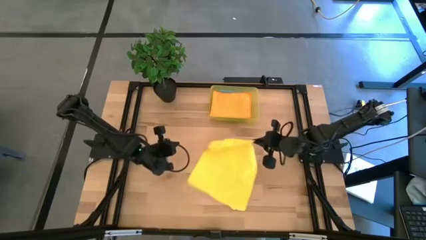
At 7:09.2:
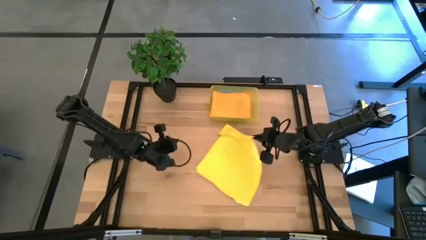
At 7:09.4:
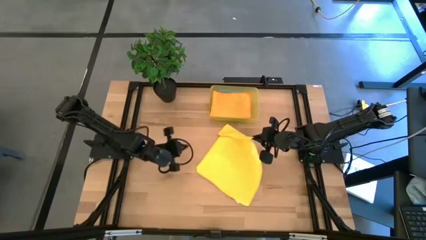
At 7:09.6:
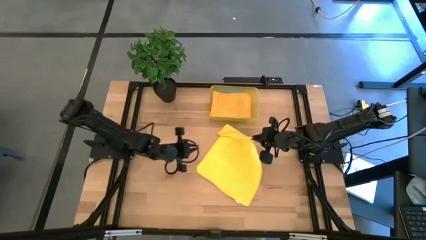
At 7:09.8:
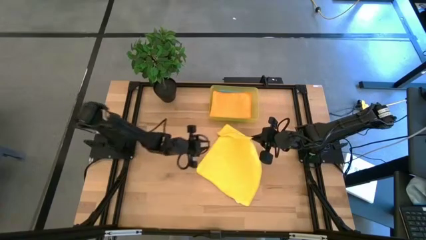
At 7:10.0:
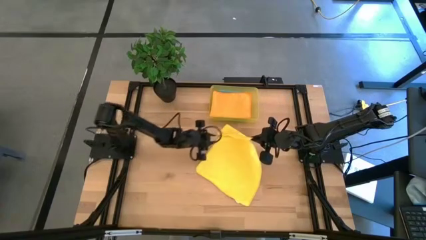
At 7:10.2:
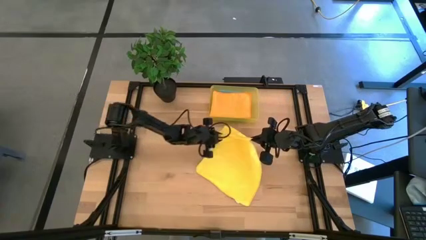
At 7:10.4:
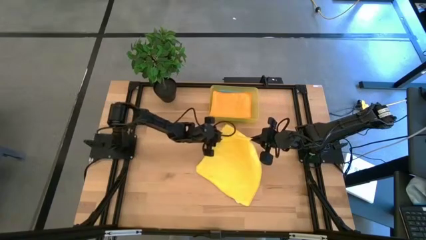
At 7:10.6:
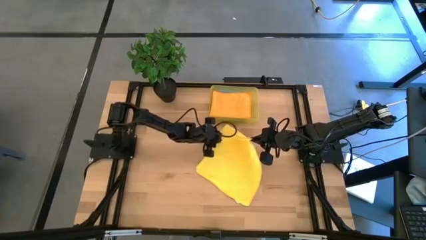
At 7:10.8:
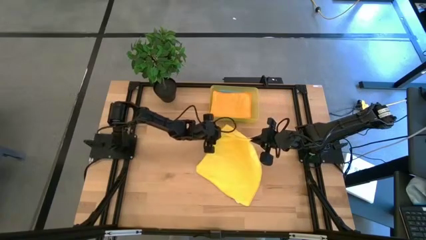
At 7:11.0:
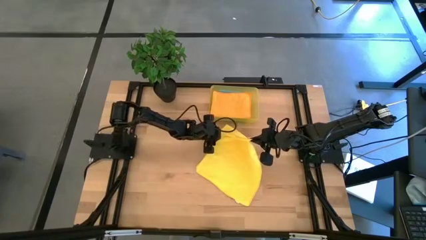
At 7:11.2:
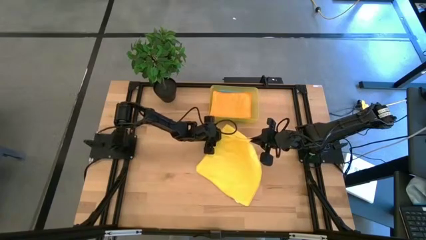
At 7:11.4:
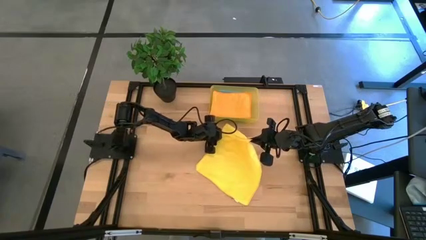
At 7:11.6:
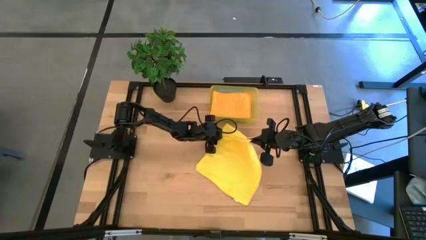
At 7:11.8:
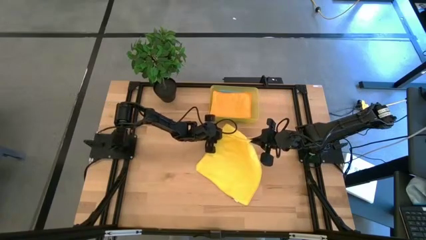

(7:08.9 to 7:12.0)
Task: Fold microfiber towels
Fold the yellow microfiber towel

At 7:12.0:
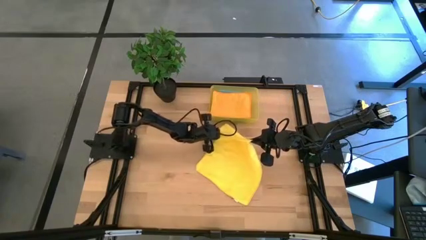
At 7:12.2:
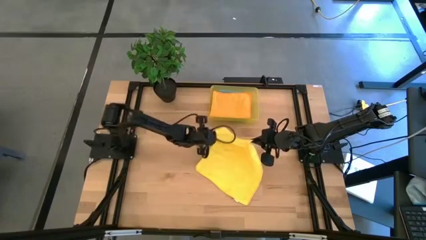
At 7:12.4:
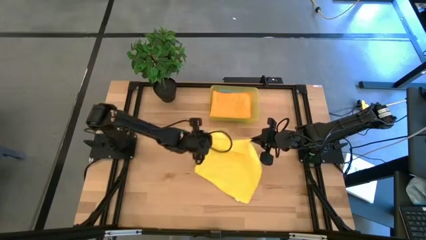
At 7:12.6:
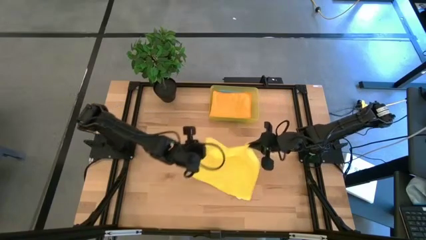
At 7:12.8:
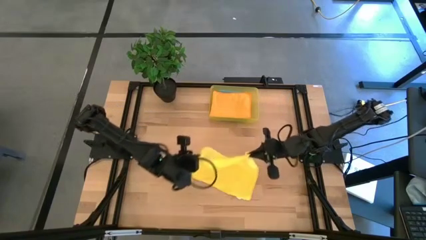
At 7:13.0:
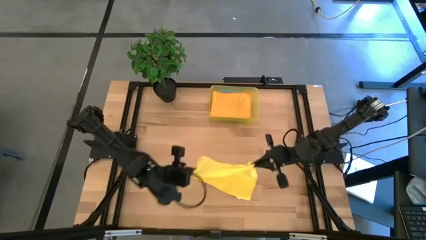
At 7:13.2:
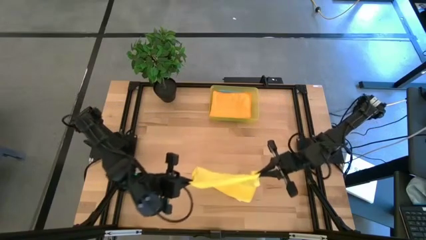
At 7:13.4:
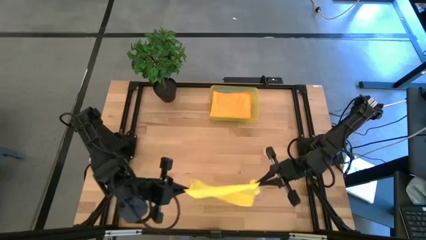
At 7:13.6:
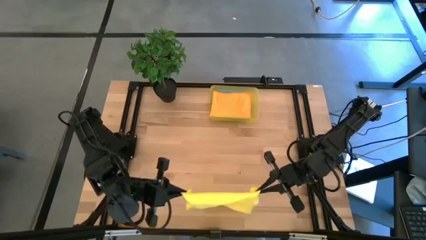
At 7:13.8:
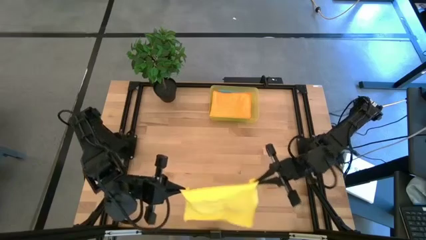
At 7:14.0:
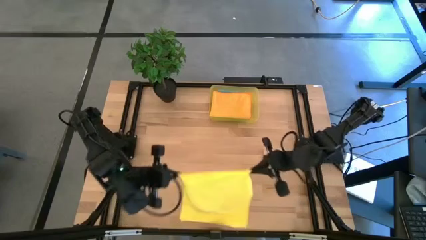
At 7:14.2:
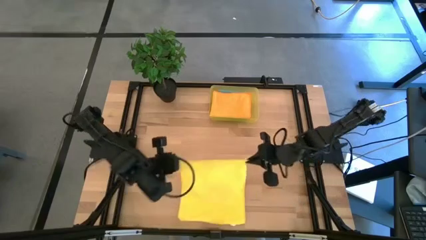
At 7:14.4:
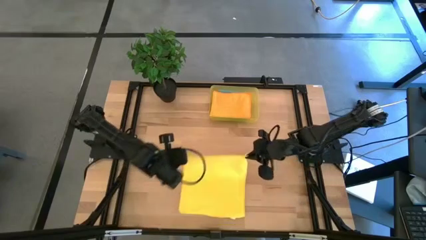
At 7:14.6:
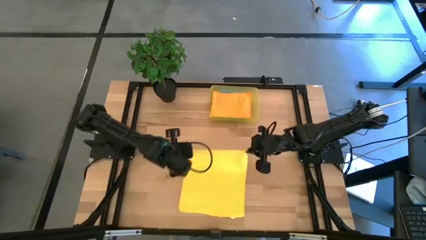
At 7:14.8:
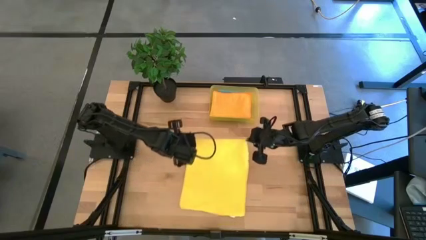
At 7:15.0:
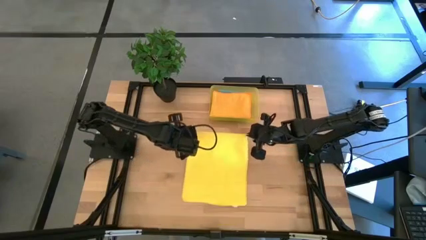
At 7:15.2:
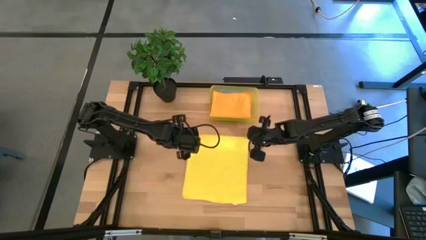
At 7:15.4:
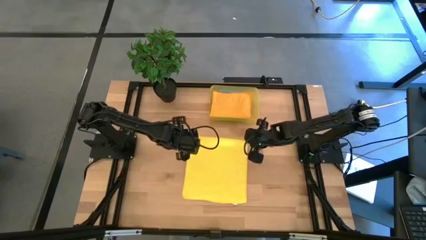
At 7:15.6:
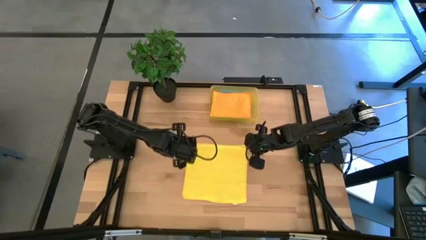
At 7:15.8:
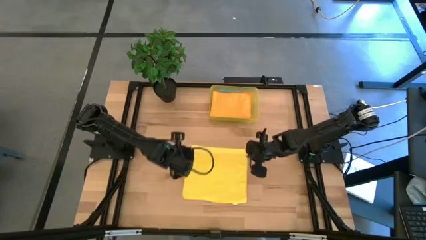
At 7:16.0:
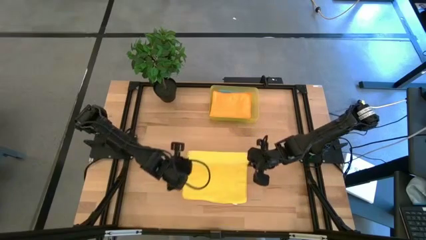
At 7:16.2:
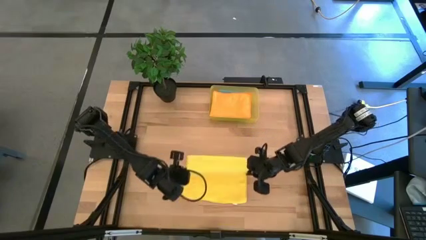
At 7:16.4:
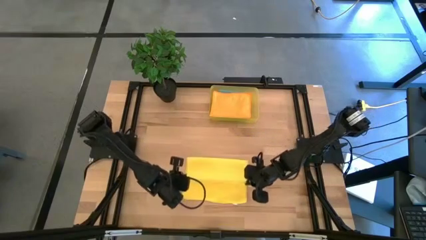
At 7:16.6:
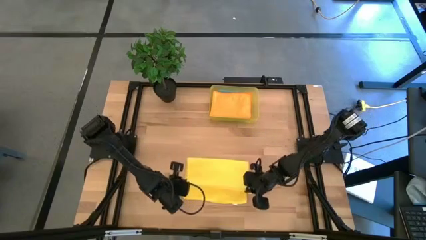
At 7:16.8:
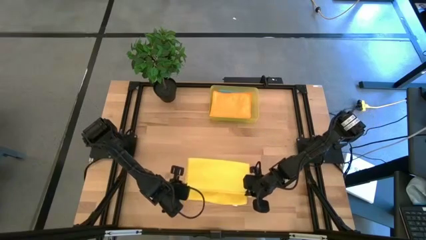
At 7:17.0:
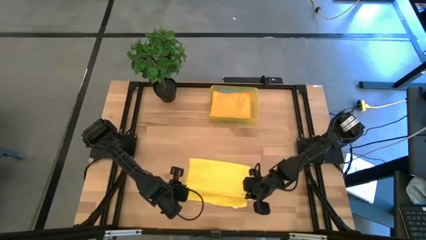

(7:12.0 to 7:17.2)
Fold the yellow microfiber towel

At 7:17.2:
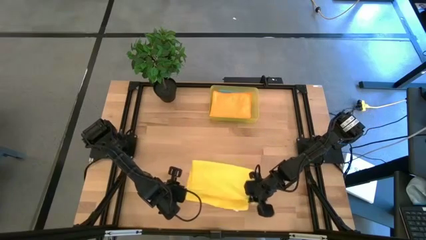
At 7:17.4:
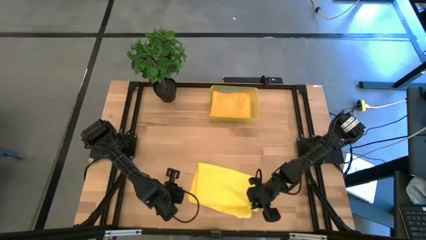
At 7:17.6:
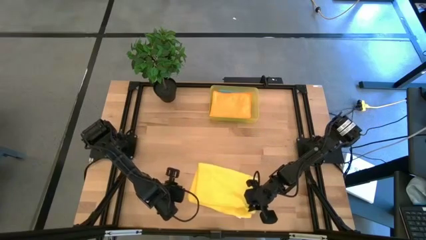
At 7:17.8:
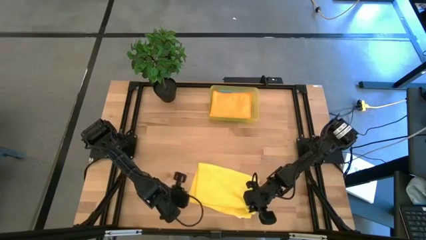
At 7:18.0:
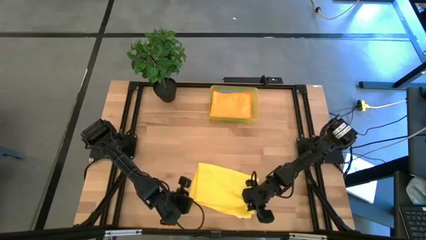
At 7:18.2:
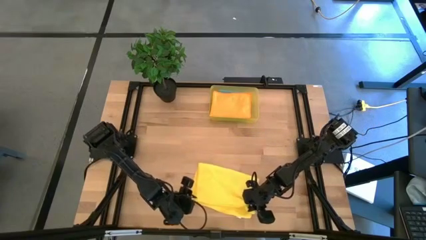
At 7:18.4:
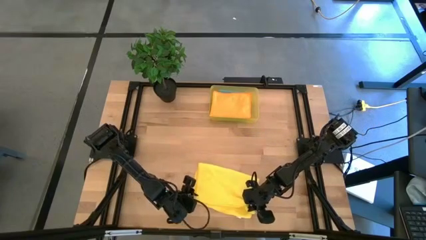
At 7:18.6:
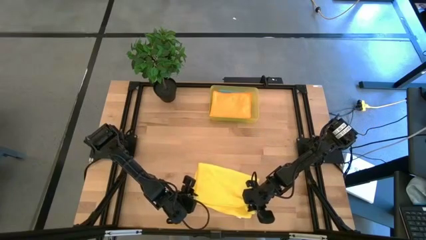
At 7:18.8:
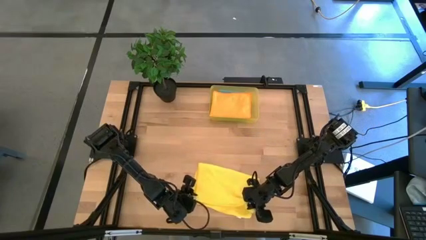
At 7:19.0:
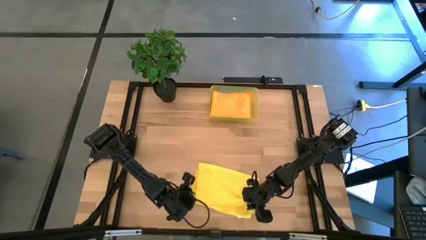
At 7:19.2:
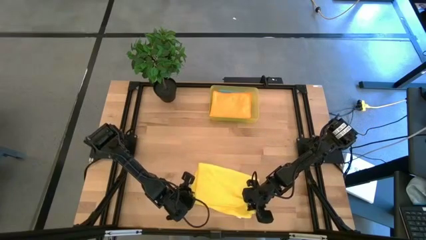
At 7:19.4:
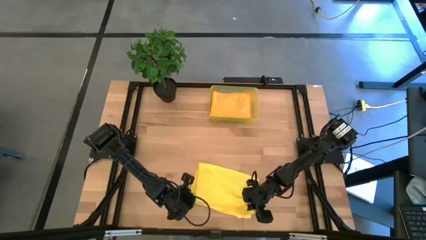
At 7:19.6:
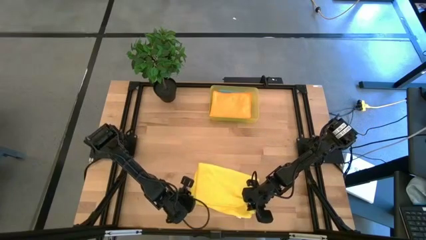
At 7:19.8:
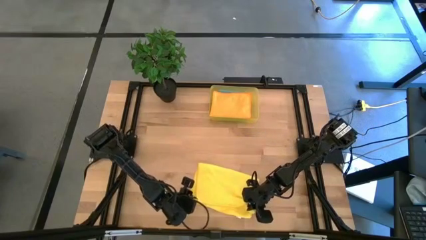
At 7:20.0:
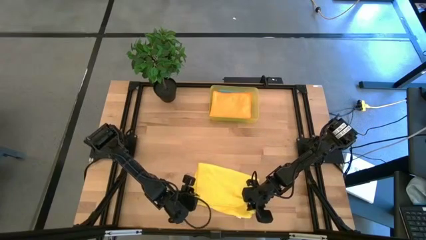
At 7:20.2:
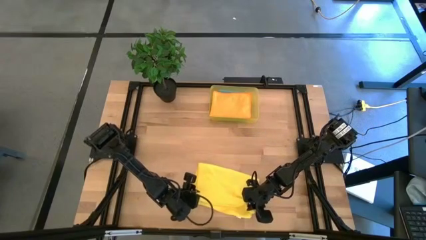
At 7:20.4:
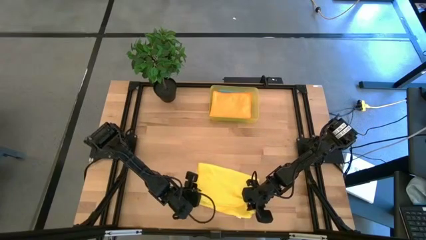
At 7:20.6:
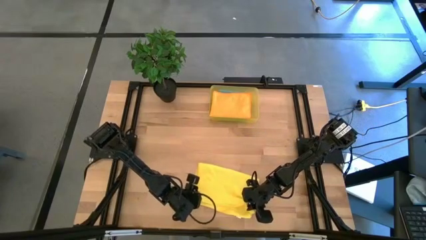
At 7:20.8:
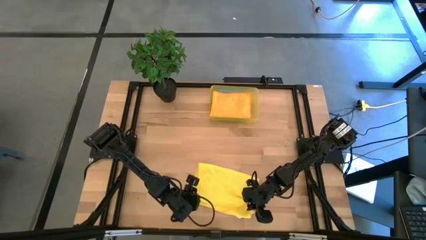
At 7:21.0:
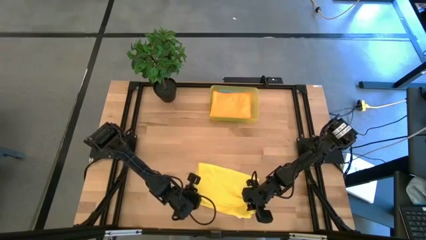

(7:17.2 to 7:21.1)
Fold the yellow microfiber towel

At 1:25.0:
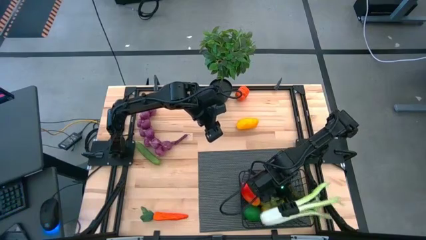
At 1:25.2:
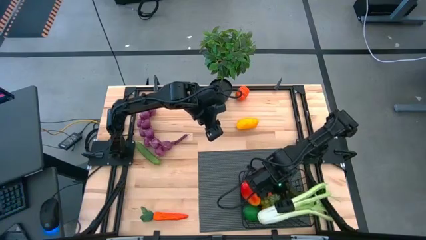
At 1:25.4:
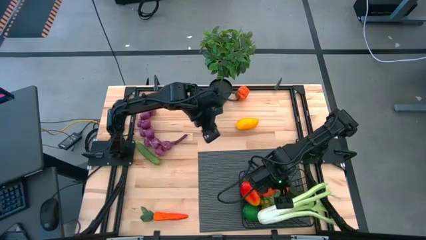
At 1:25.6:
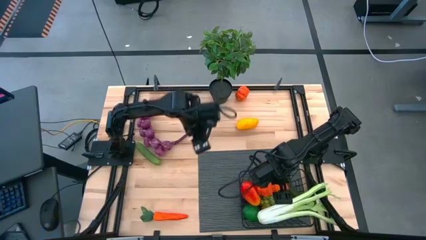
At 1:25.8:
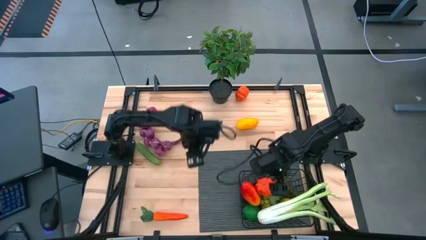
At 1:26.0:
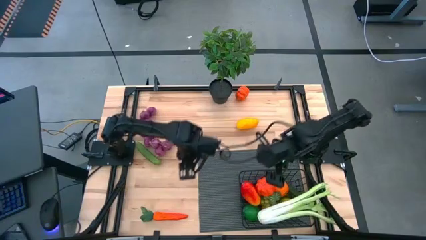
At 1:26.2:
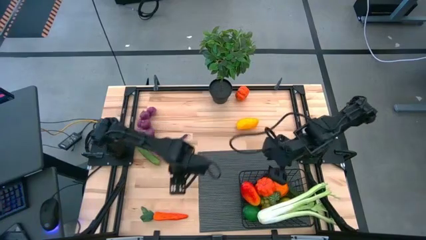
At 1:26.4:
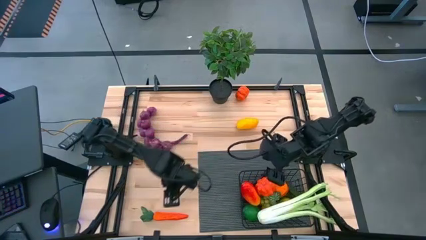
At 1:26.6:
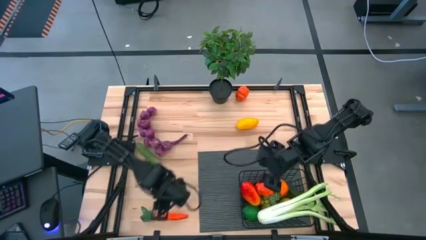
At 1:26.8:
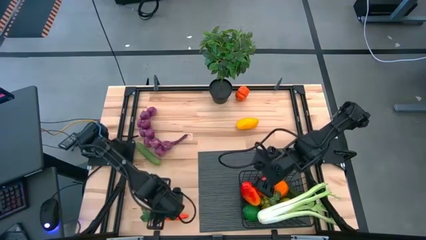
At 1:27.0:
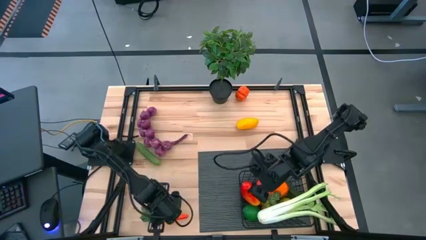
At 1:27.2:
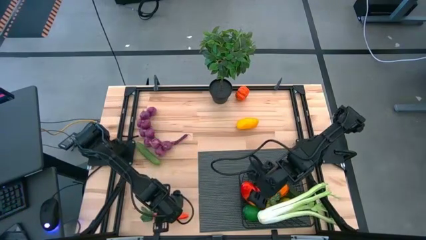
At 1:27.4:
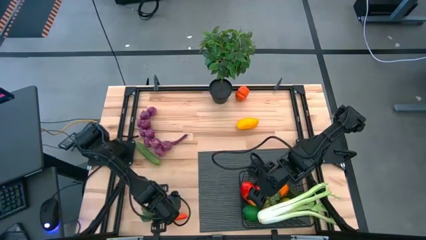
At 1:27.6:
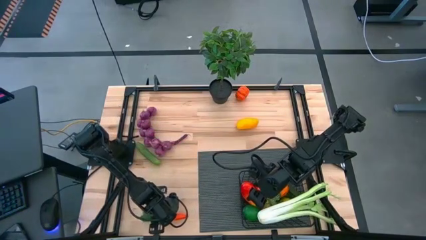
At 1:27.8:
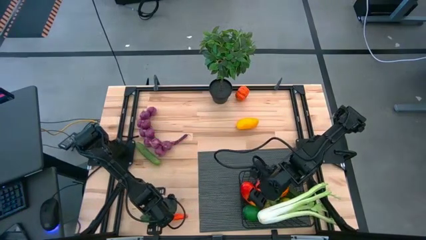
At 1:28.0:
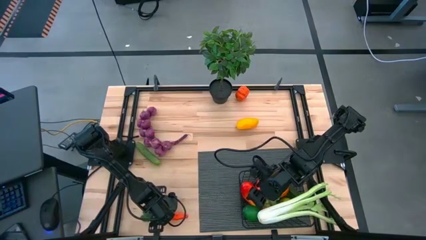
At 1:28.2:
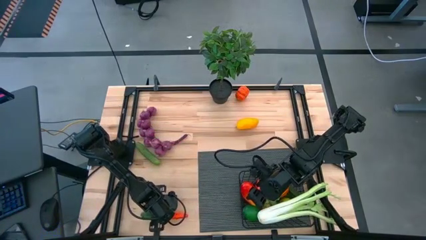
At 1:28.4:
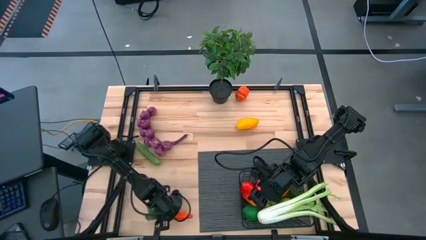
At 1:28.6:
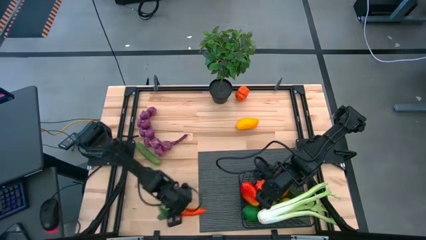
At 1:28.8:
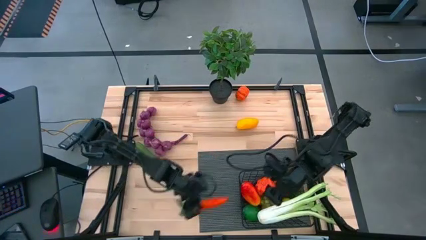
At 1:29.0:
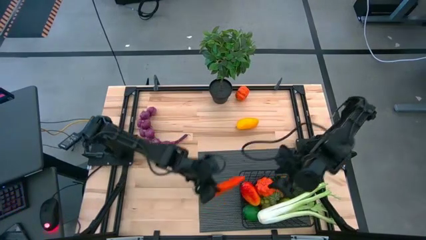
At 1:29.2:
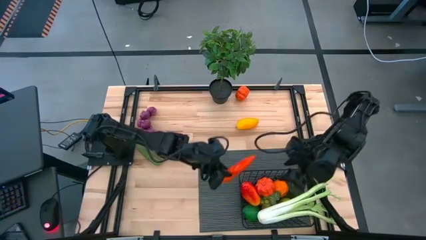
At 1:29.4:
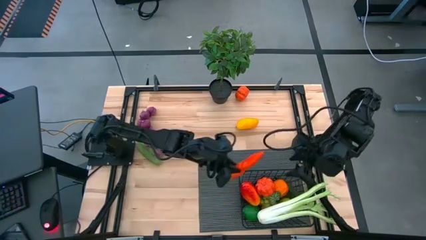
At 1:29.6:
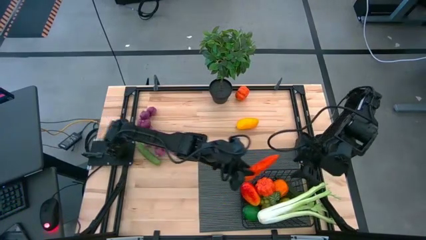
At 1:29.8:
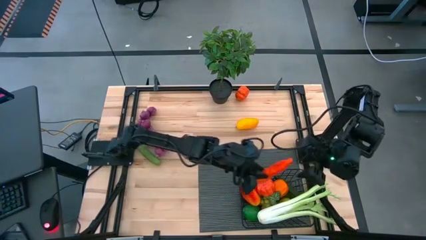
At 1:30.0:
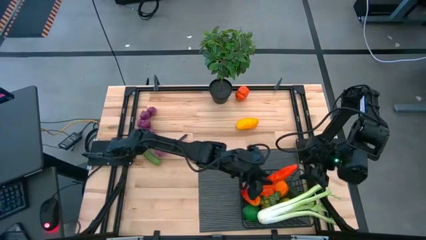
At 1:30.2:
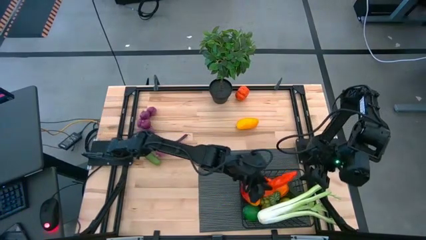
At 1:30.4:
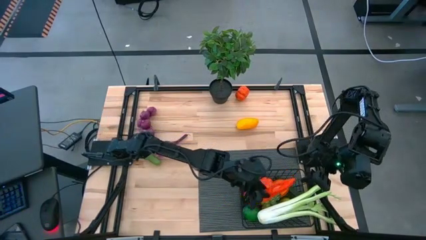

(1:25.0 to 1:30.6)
Task: Build produce basket
Put the orange carrot into the black wire basket
